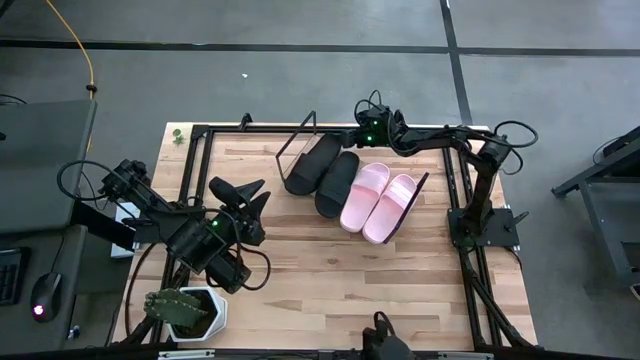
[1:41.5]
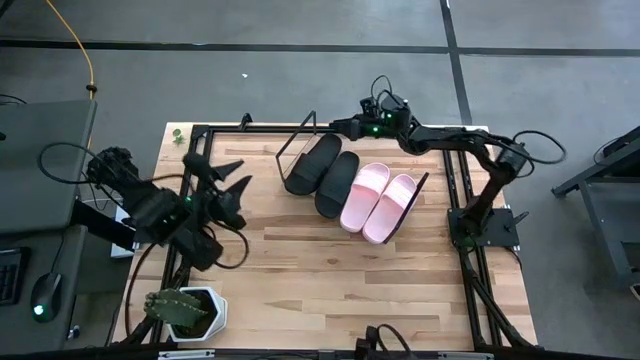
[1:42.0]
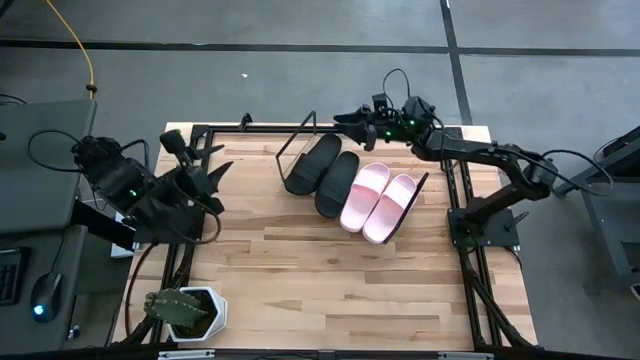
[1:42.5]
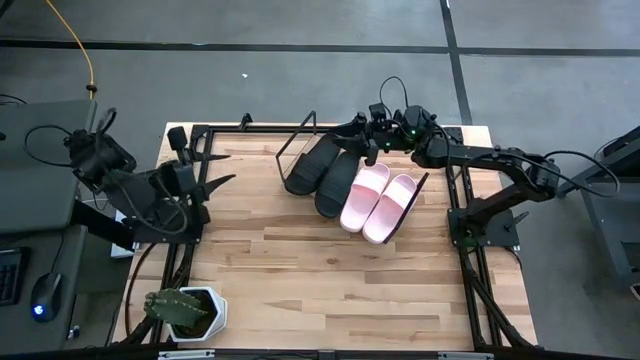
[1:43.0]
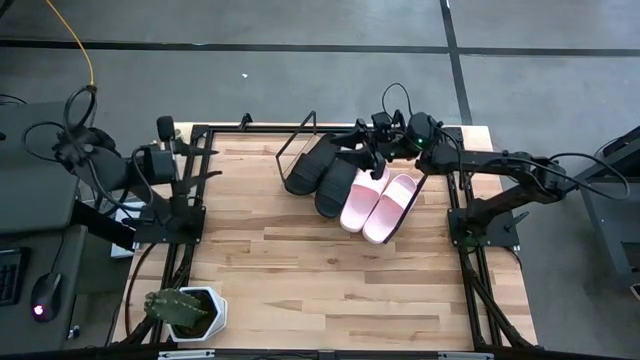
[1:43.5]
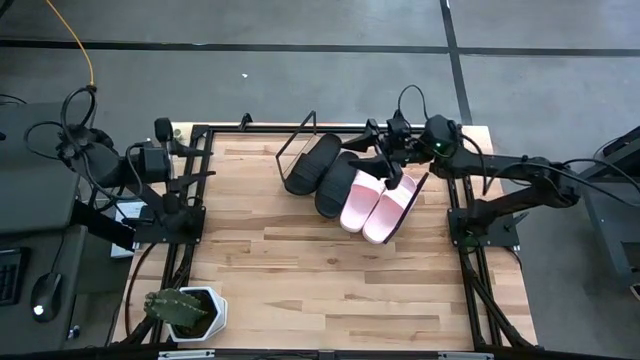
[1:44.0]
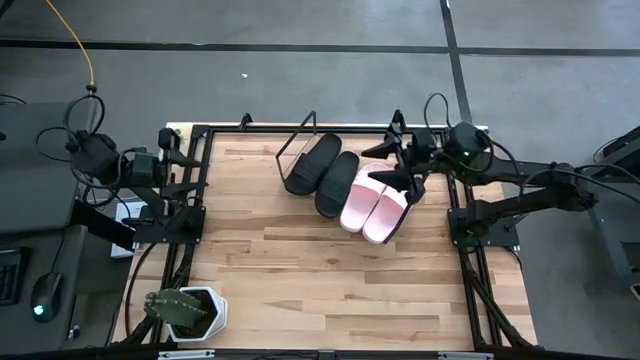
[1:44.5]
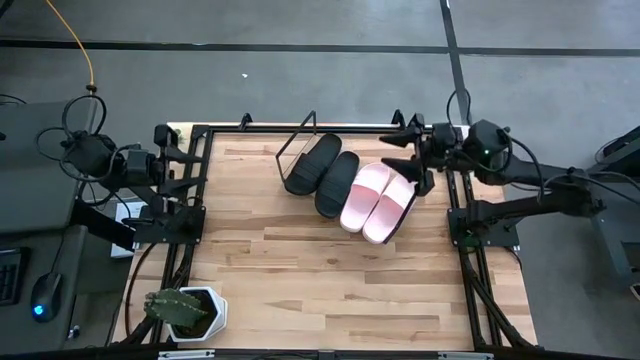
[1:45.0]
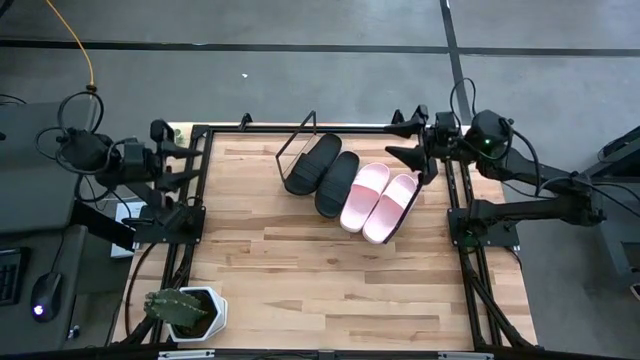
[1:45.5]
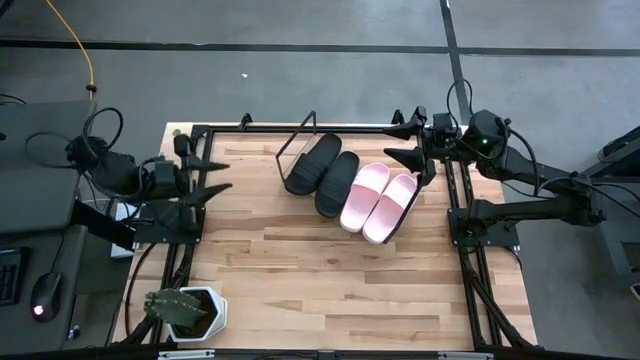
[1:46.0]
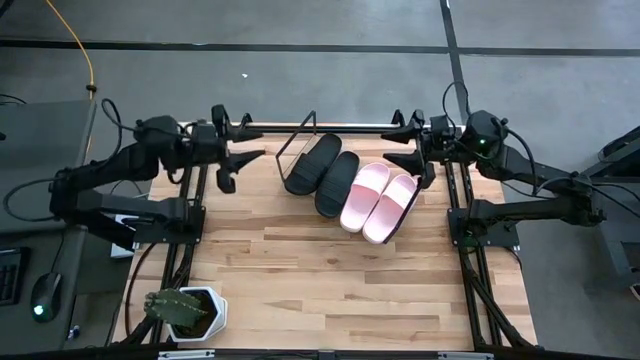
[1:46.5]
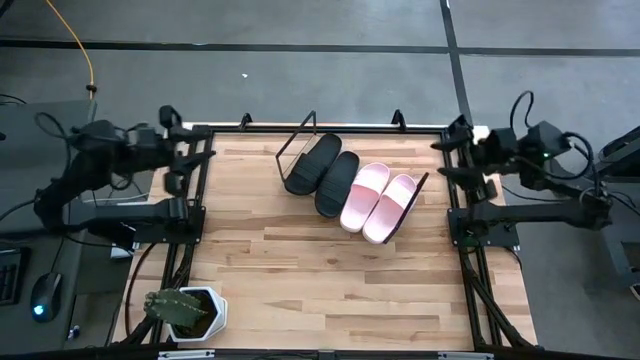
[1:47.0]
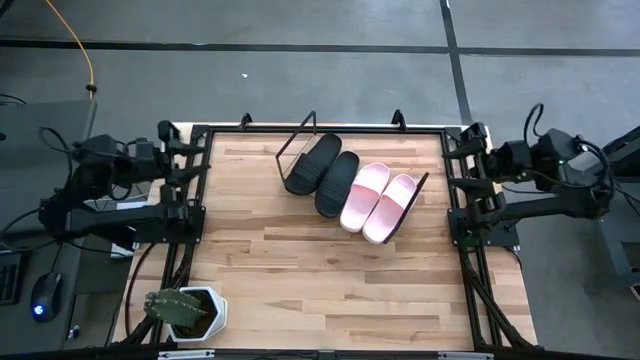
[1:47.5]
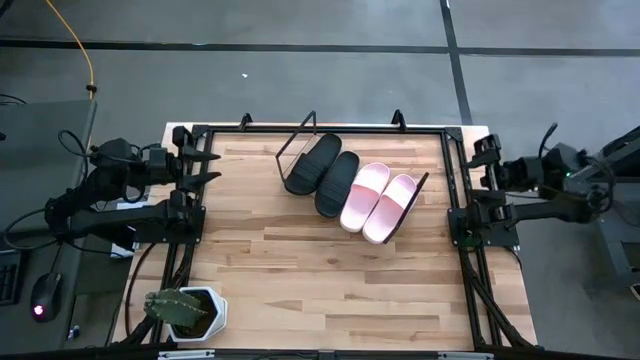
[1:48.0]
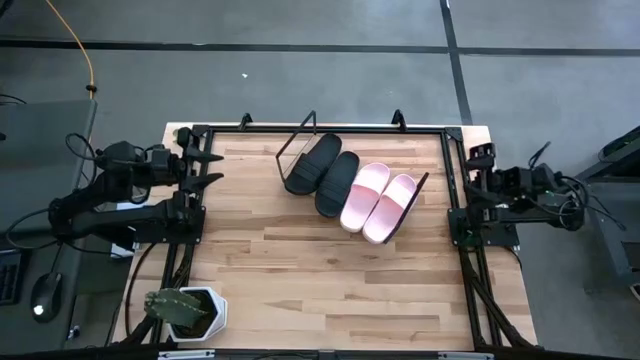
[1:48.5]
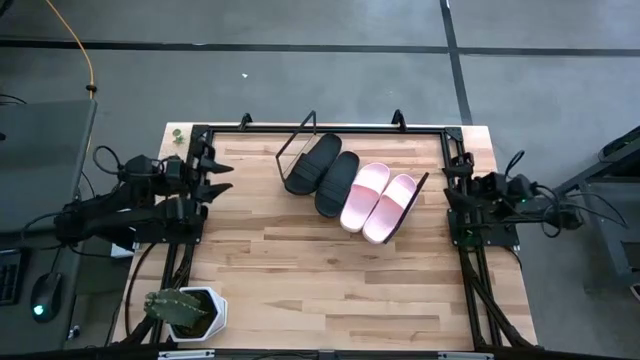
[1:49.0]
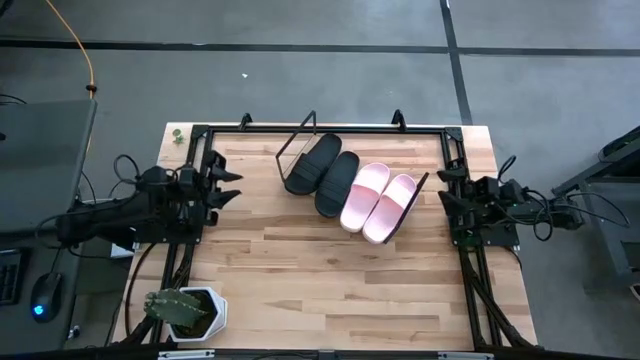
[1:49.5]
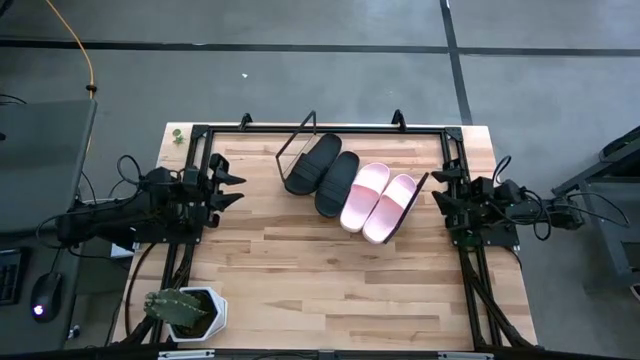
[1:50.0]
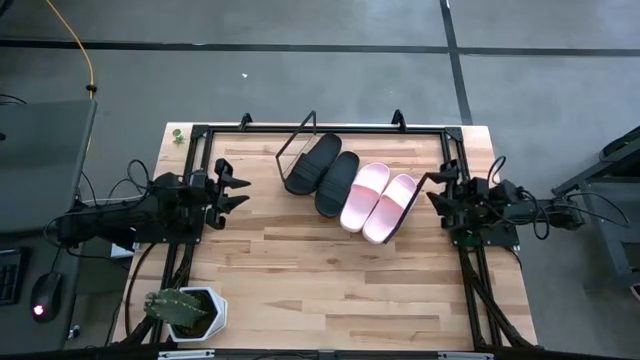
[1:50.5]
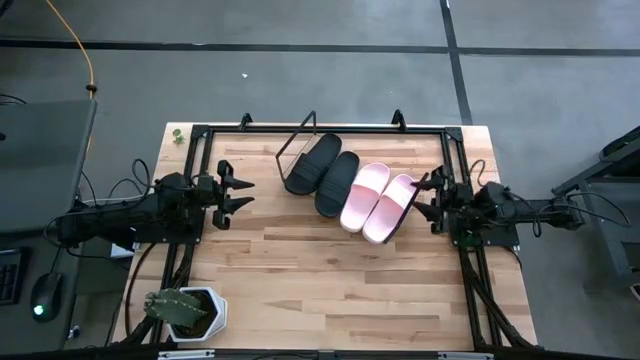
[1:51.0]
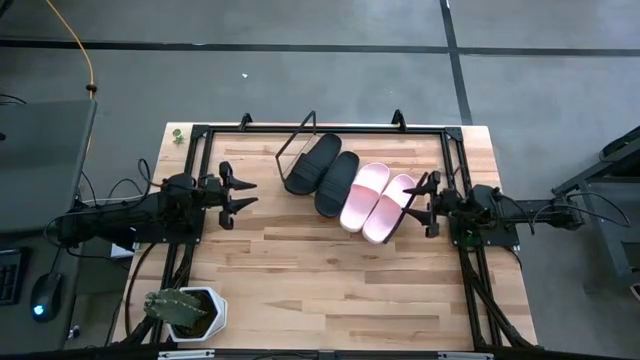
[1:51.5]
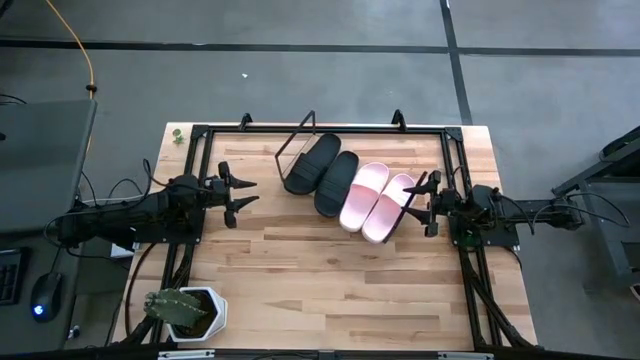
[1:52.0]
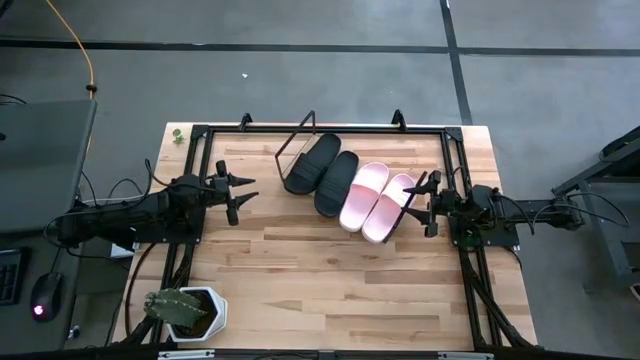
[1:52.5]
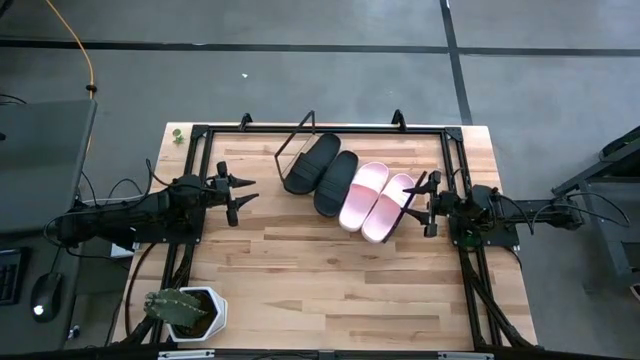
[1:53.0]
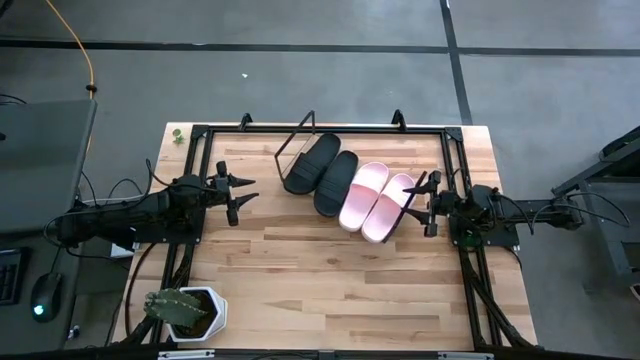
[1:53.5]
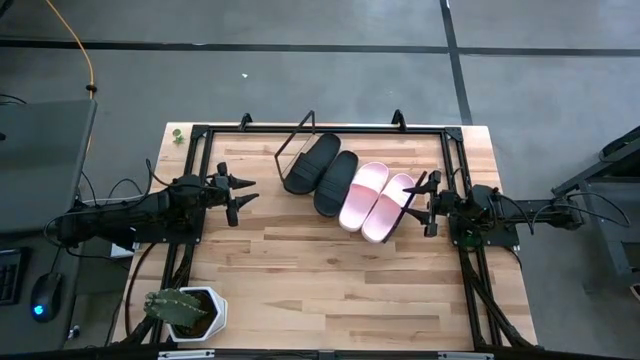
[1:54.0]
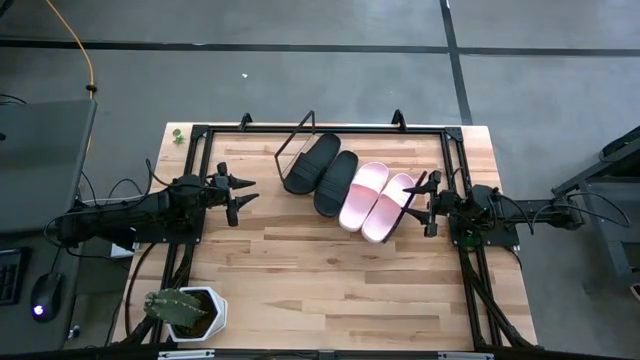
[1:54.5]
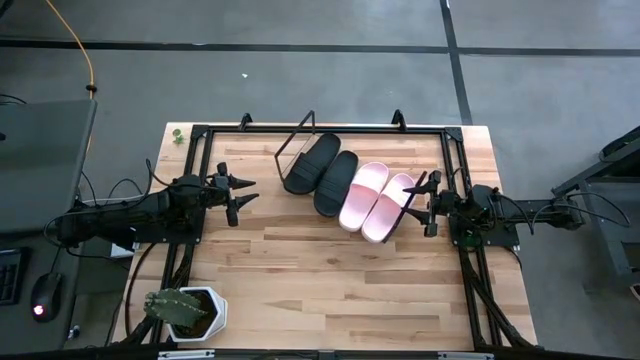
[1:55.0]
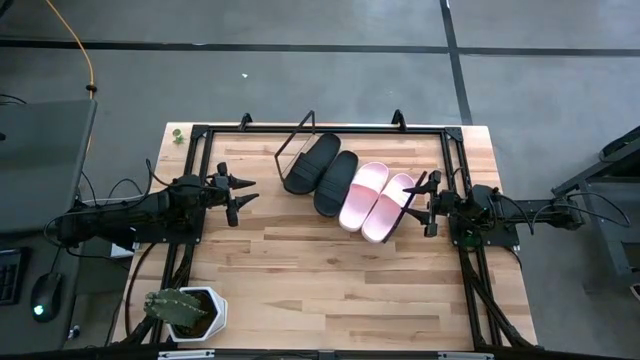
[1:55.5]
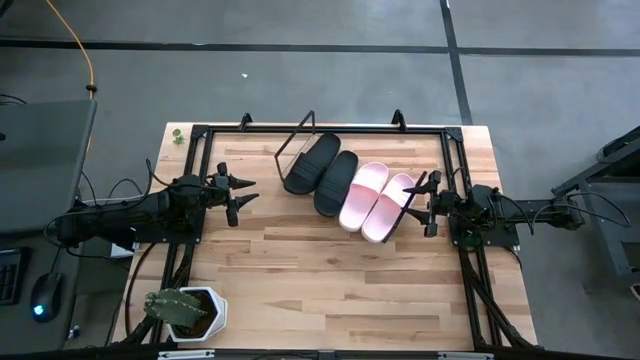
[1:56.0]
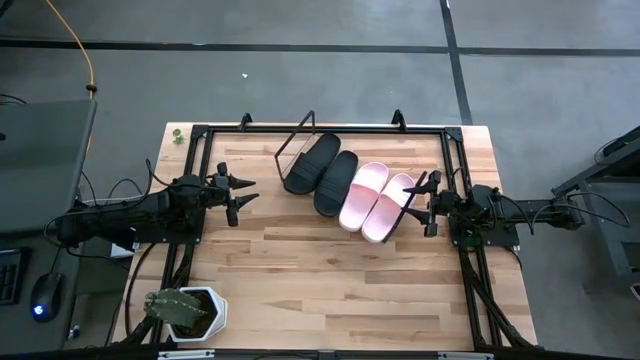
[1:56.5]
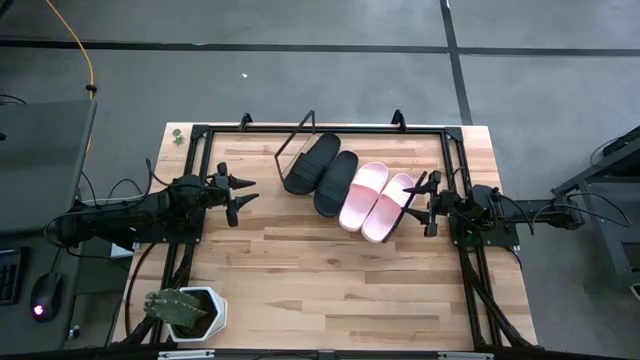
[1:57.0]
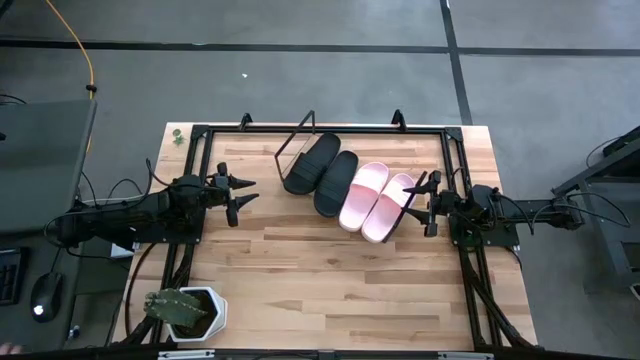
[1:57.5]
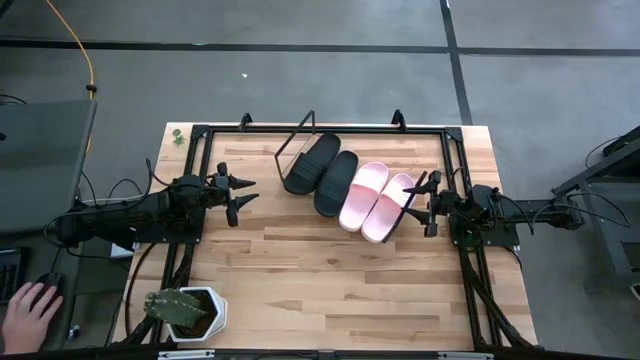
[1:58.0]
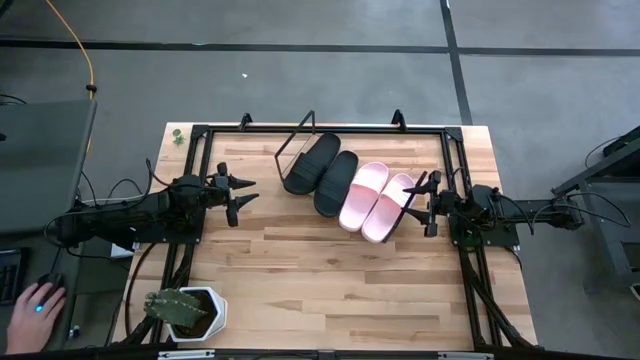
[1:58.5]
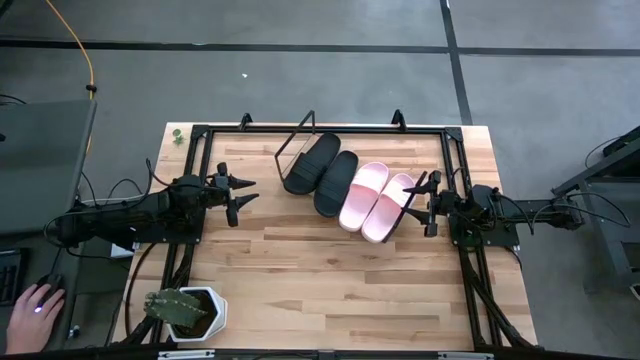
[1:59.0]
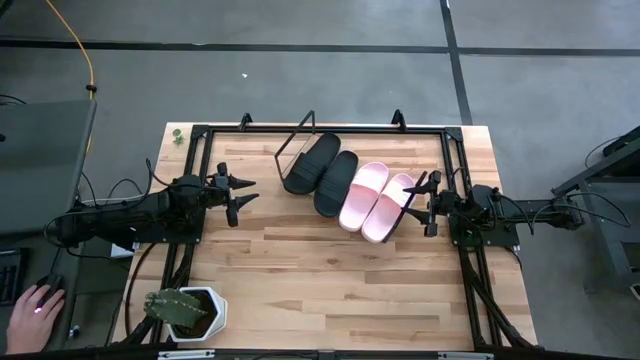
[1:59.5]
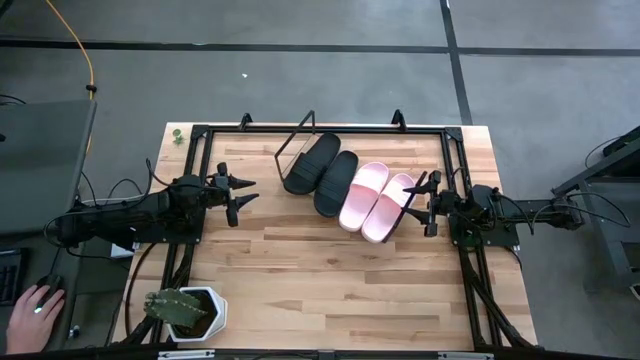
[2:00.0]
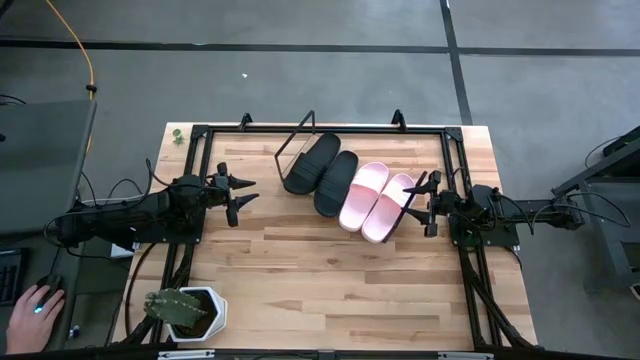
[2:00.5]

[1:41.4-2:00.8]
Task: Pick and place slides into the shelf
Return to Home Position

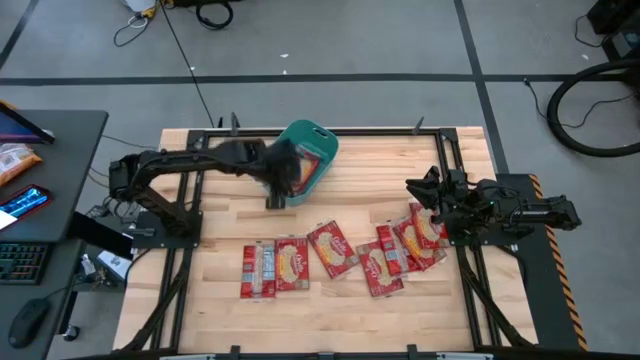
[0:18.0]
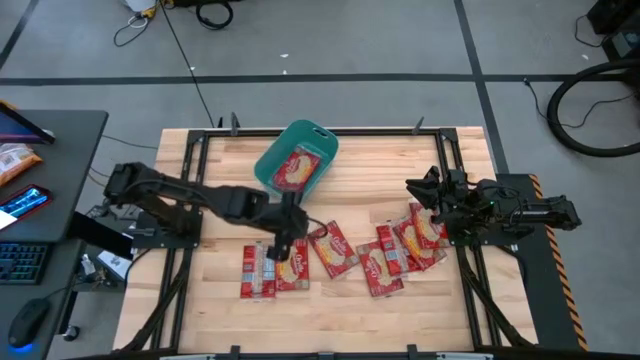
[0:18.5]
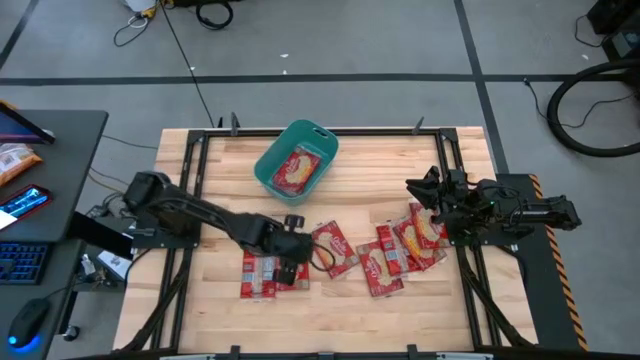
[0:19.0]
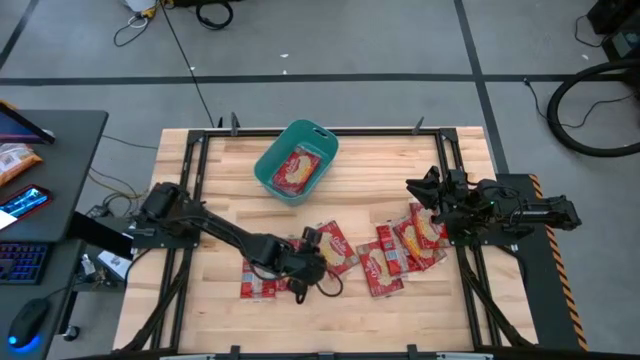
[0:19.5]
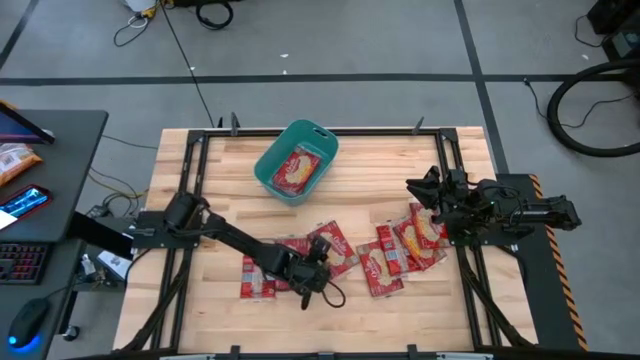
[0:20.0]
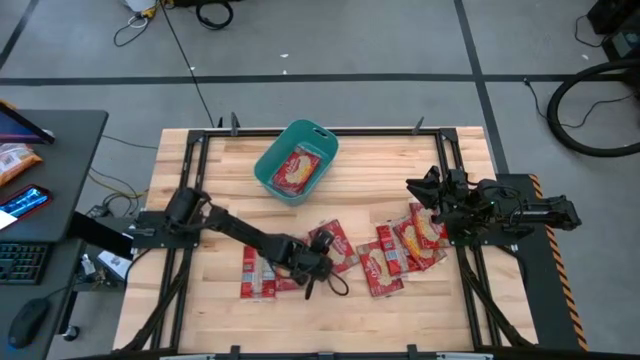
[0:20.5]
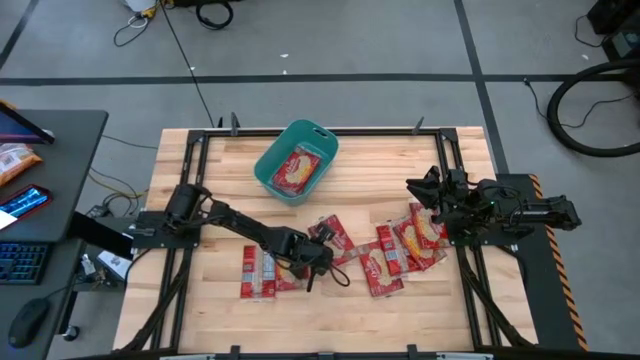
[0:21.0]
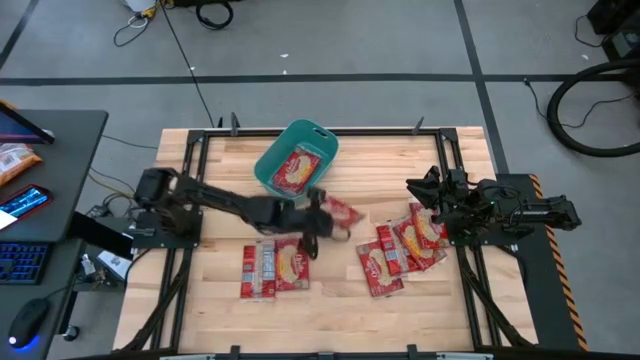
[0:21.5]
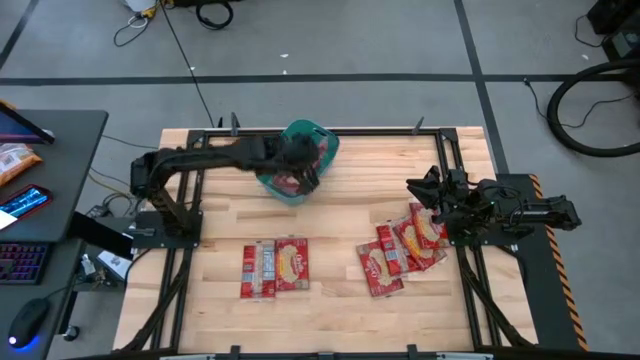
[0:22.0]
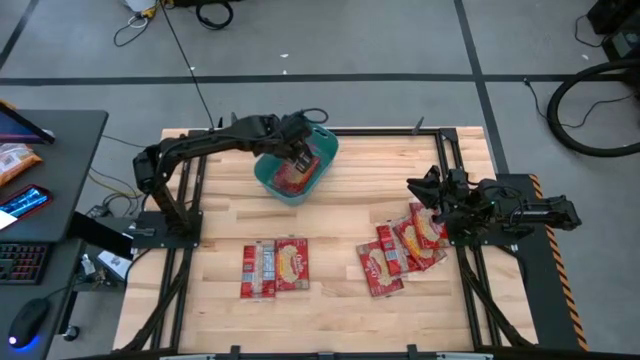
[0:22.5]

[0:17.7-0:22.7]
Task: Sort popcorn bags into baskets
Put the red popcorn bag into the blue bin
